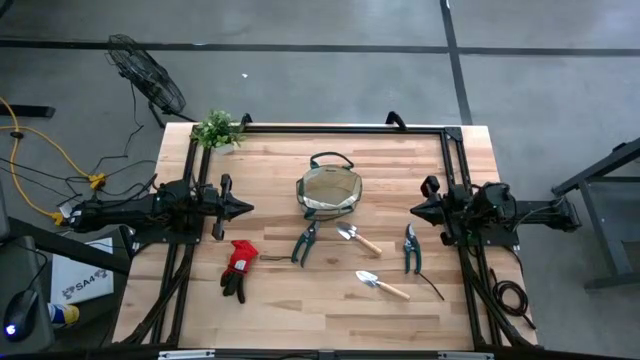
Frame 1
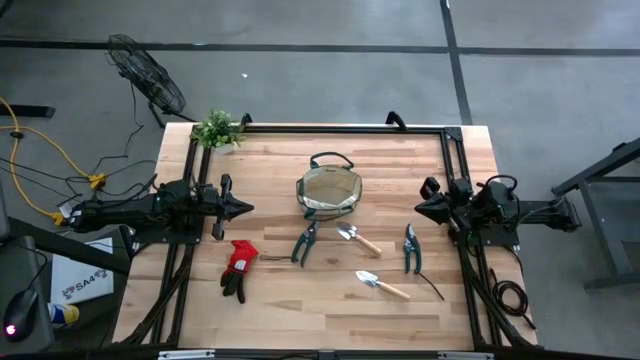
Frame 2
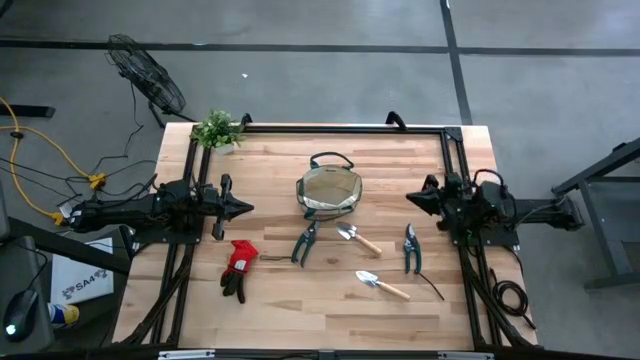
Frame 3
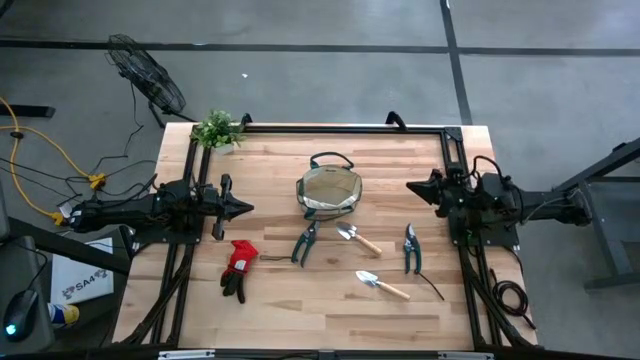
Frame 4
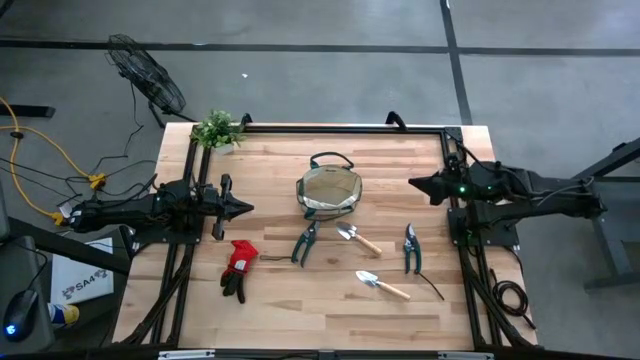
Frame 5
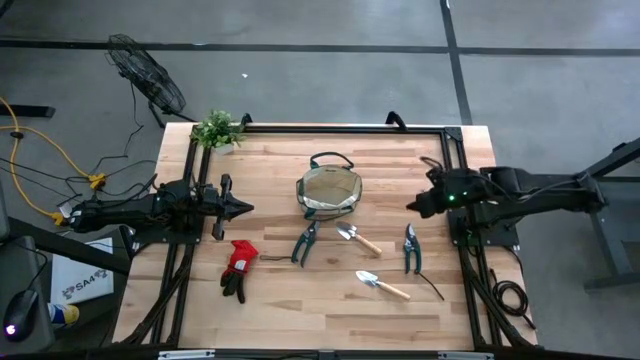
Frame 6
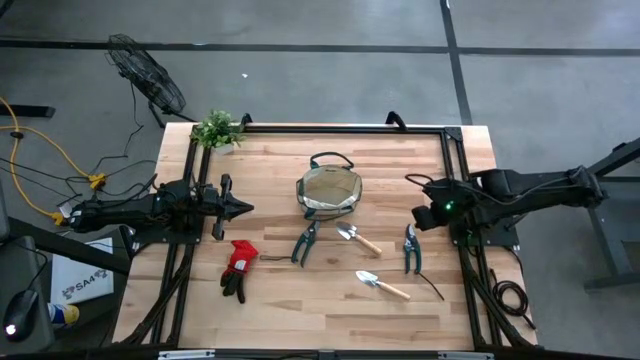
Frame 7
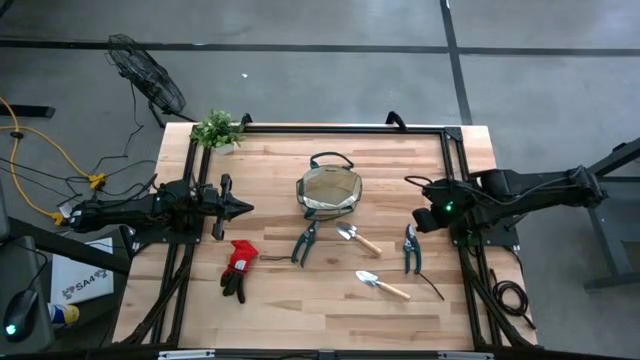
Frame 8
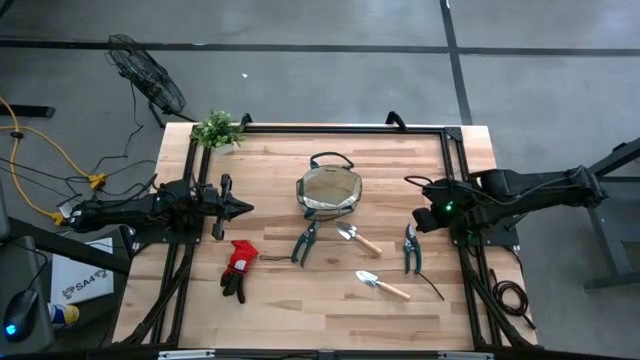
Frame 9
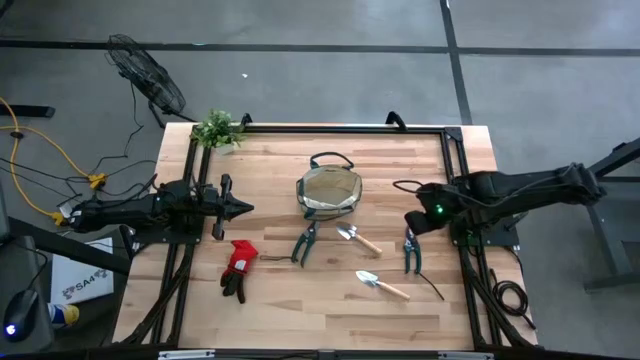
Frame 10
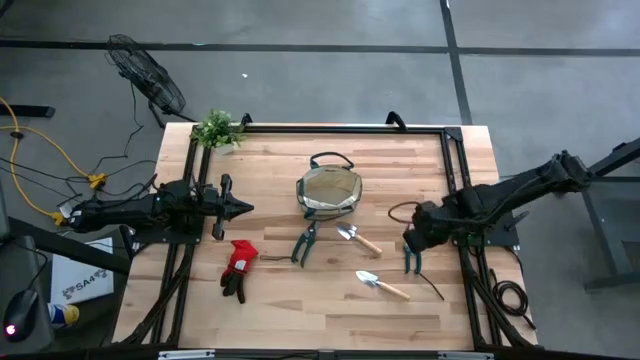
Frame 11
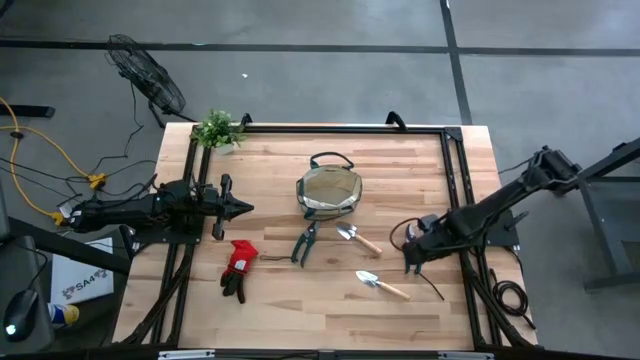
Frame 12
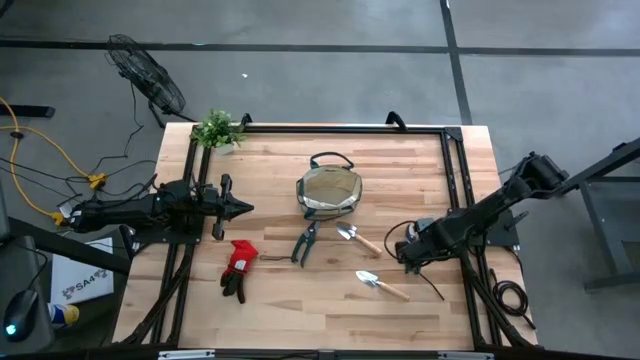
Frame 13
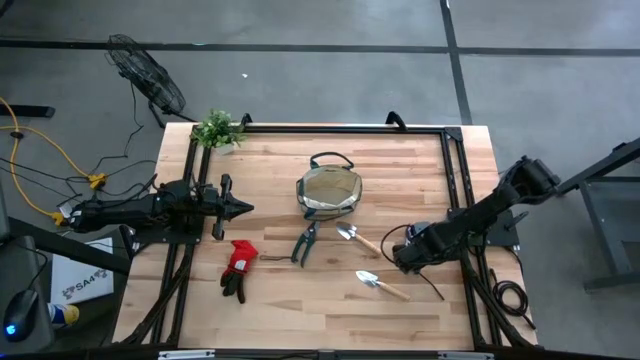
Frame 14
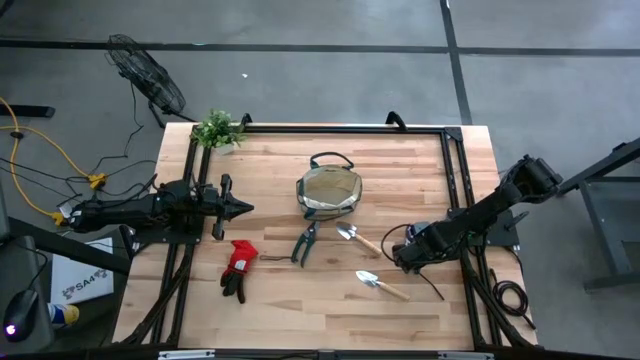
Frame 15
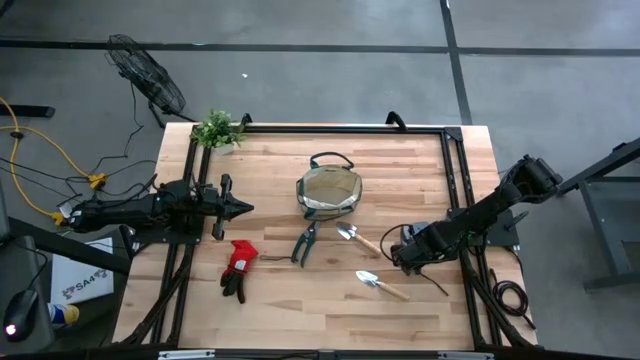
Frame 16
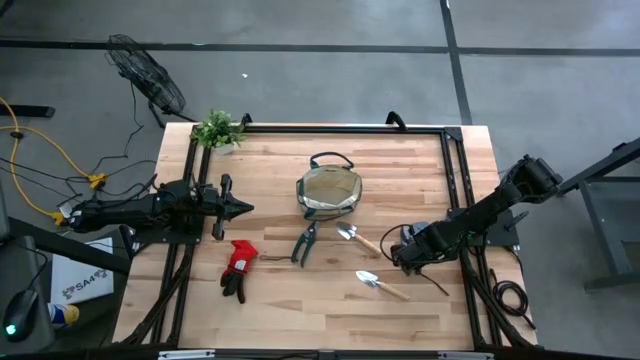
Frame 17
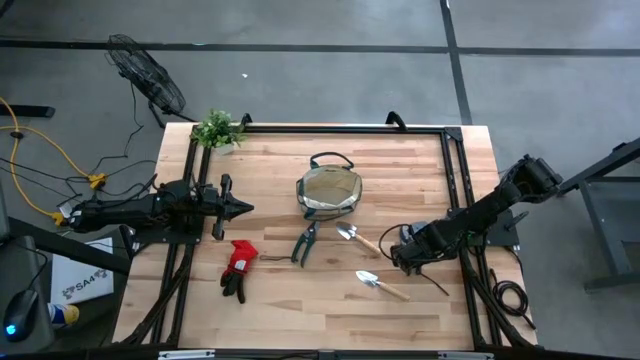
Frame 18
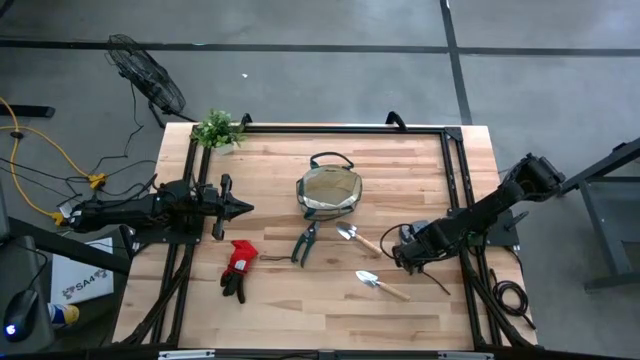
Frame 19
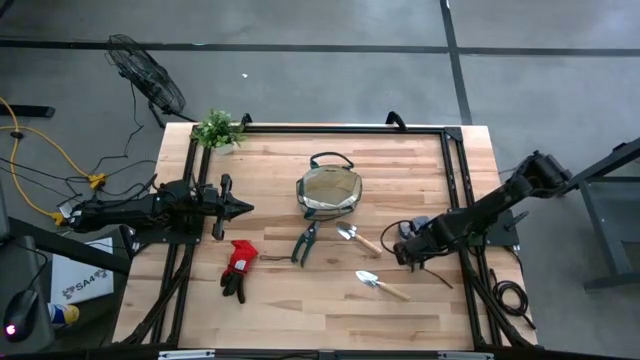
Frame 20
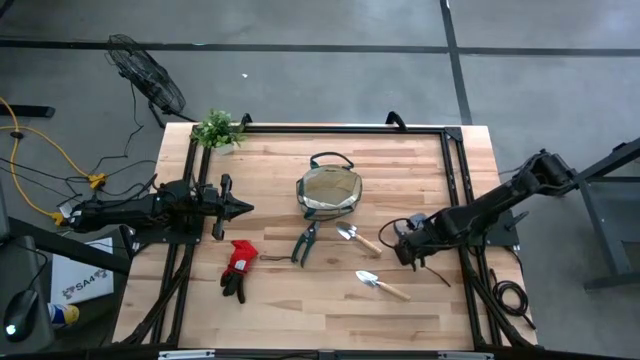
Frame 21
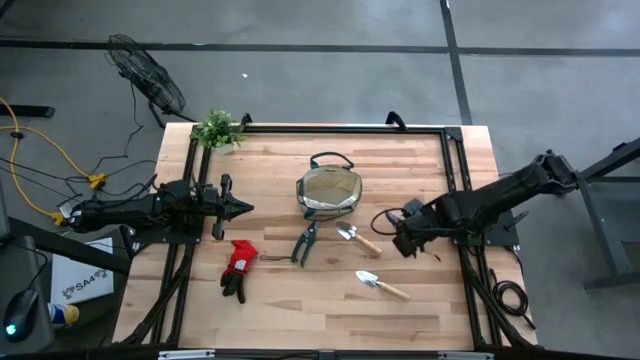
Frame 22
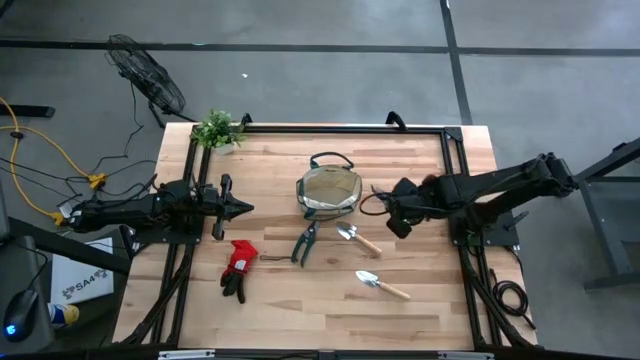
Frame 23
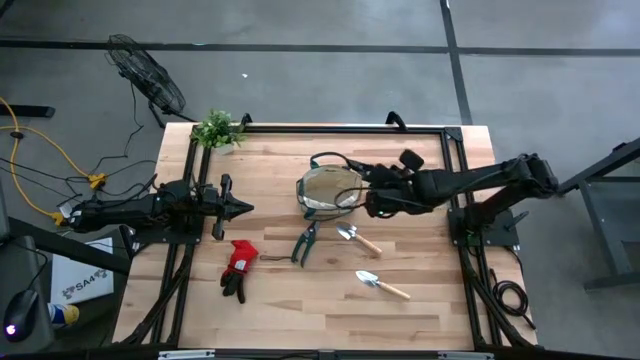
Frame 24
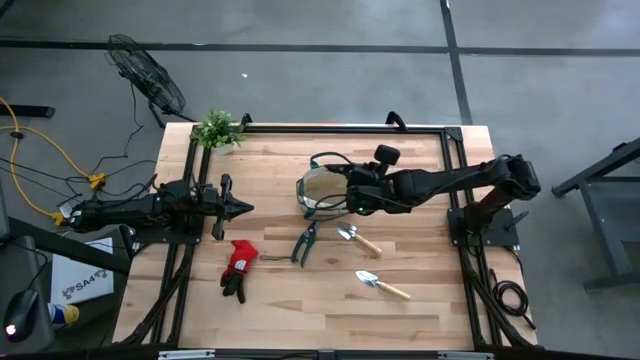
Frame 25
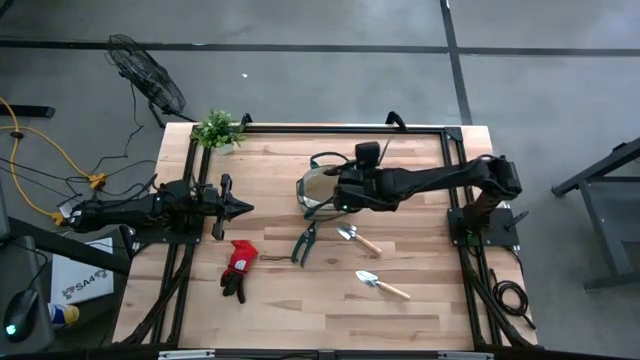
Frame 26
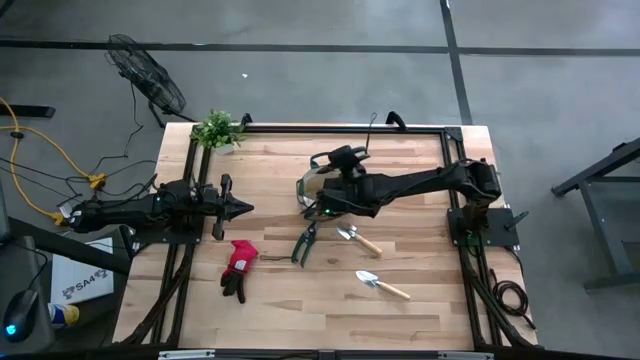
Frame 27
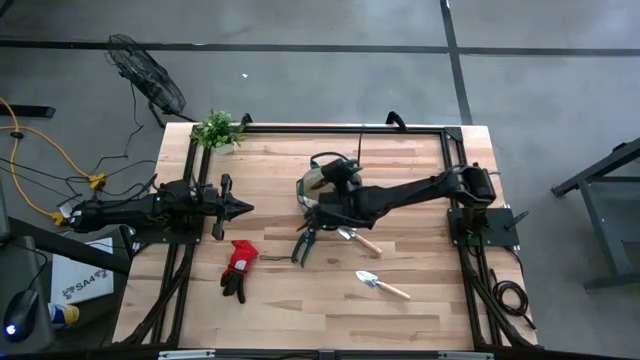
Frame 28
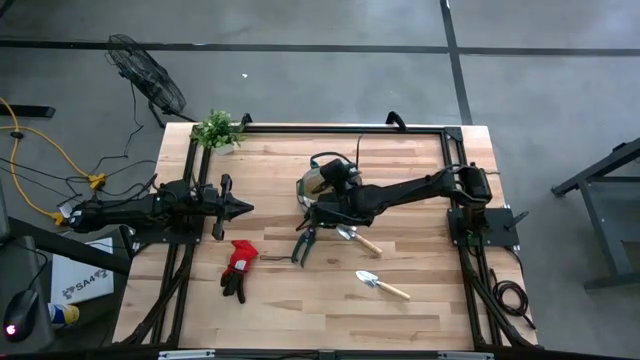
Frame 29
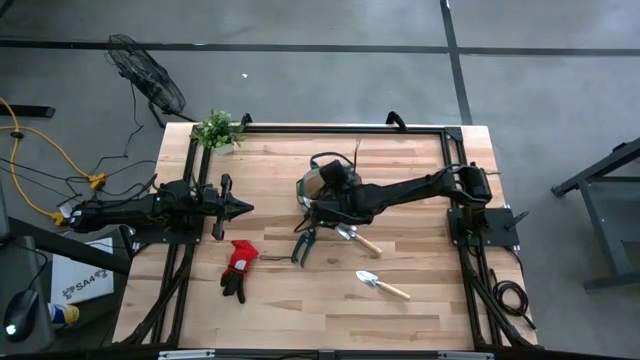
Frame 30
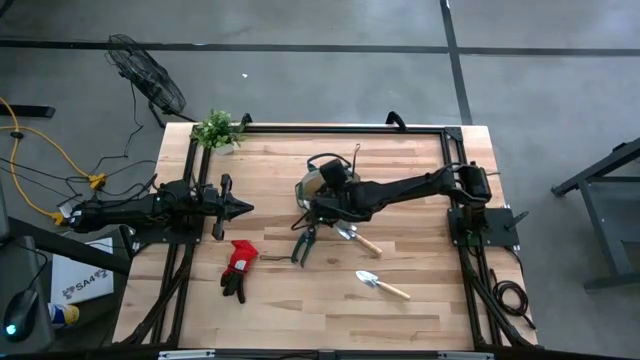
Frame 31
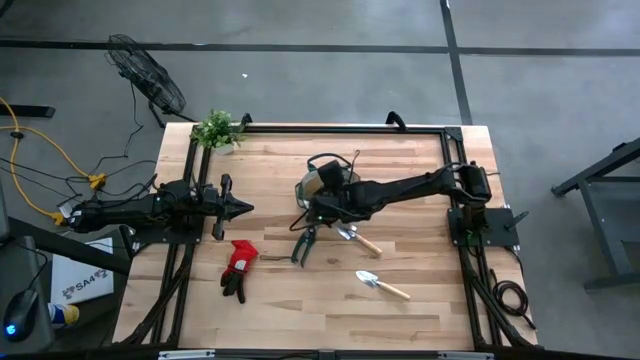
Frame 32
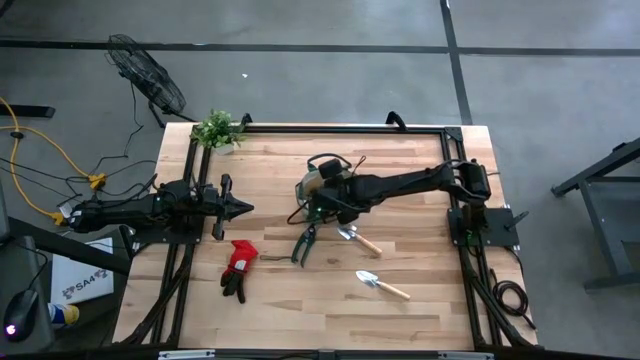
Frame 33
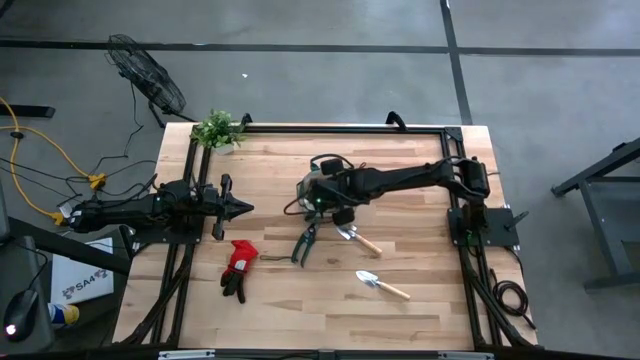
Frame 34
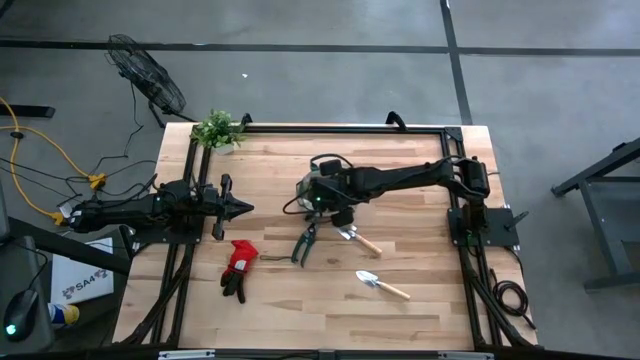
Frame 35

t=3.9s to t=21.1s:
Task: Pick & Place Garden tools in Gardening bag
Put the right green shears into the gardening bag
